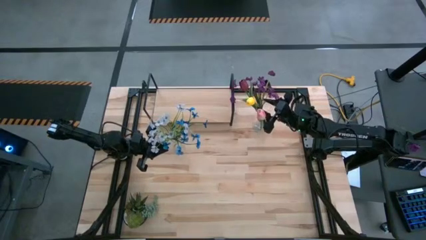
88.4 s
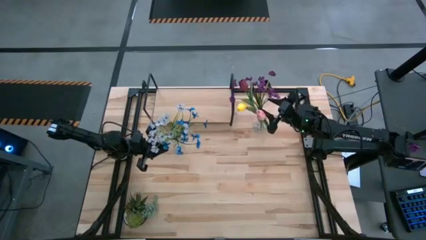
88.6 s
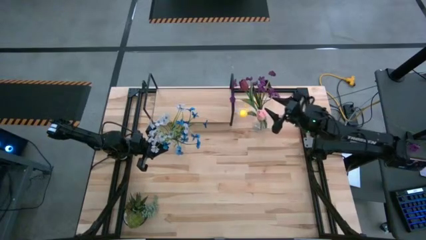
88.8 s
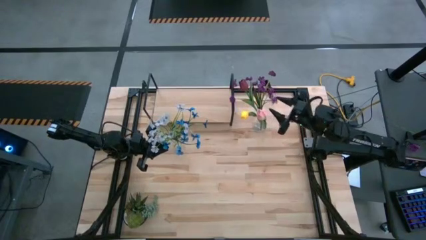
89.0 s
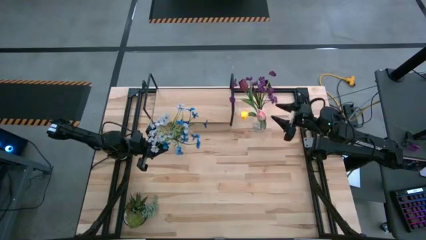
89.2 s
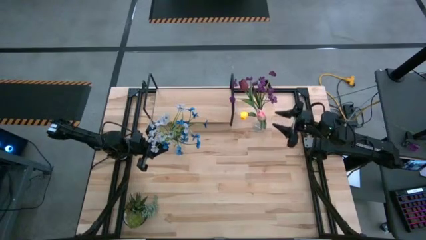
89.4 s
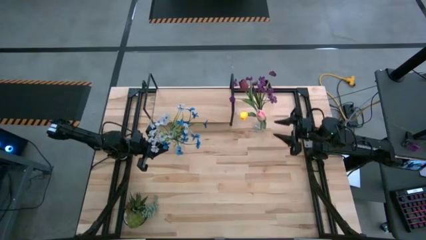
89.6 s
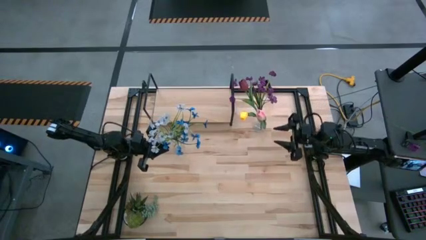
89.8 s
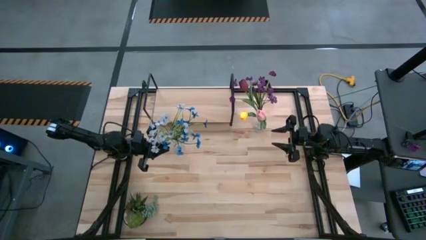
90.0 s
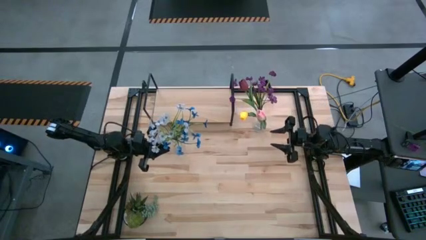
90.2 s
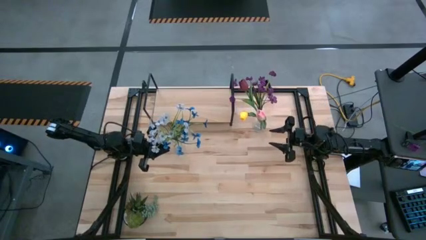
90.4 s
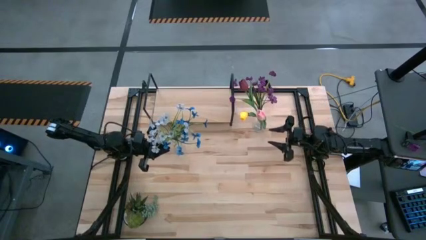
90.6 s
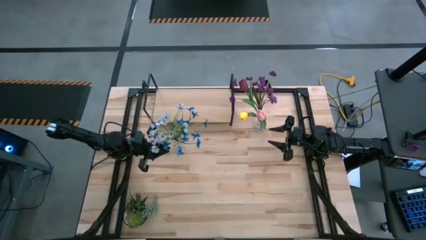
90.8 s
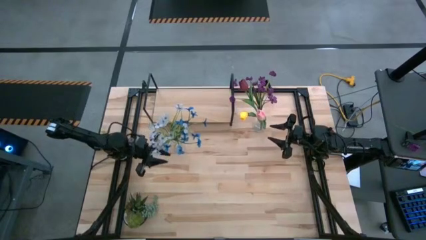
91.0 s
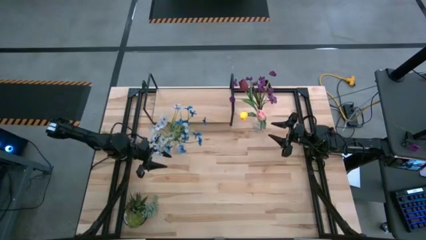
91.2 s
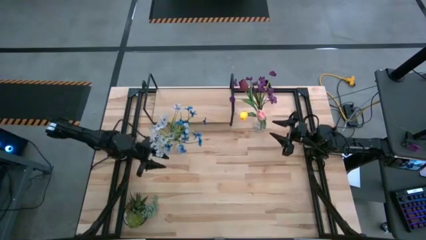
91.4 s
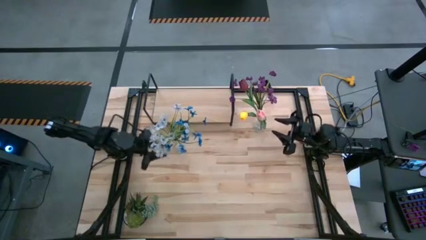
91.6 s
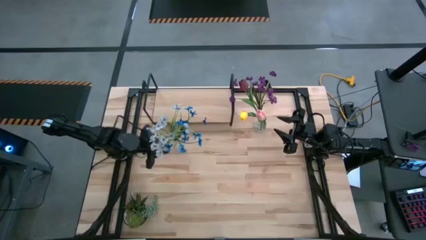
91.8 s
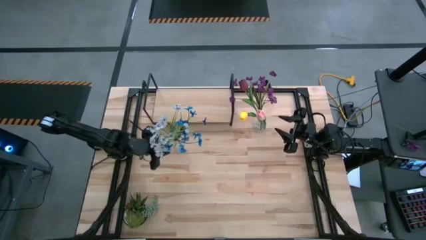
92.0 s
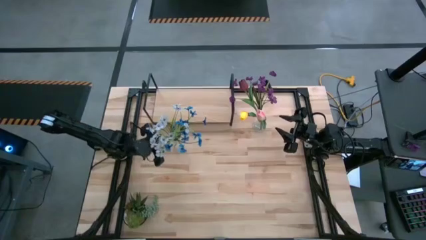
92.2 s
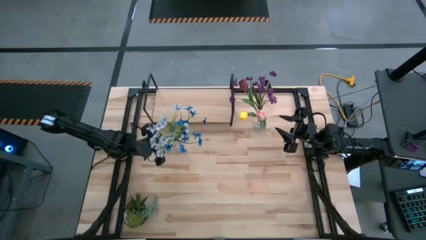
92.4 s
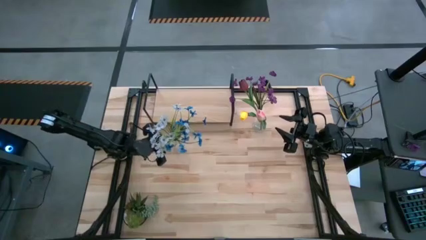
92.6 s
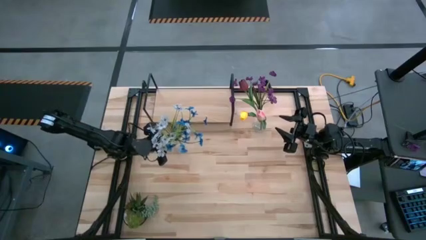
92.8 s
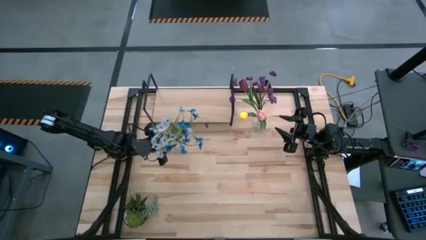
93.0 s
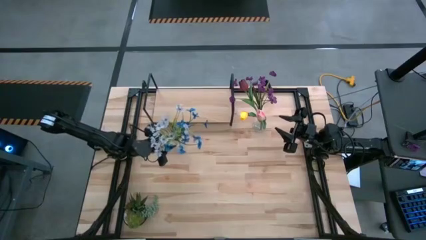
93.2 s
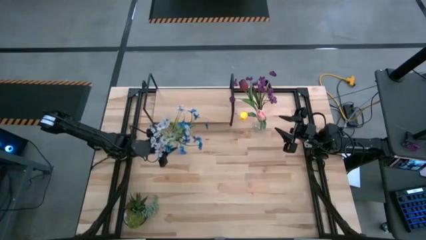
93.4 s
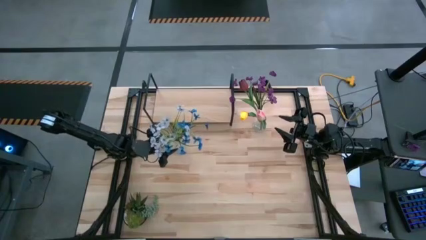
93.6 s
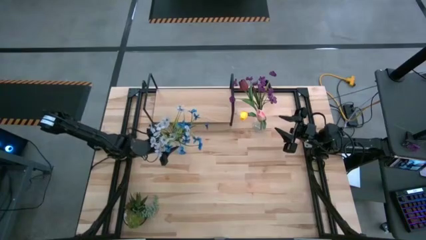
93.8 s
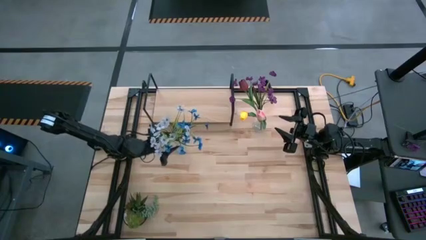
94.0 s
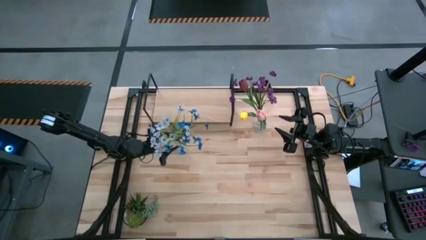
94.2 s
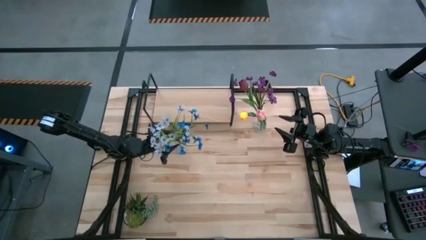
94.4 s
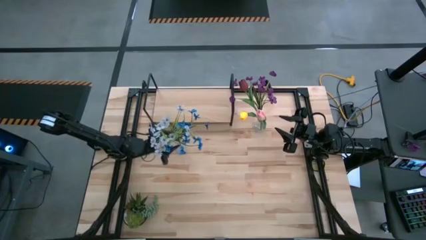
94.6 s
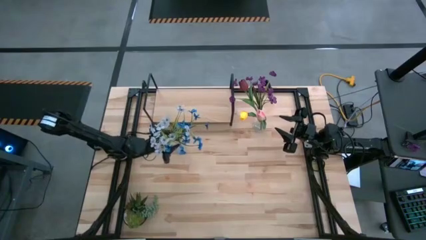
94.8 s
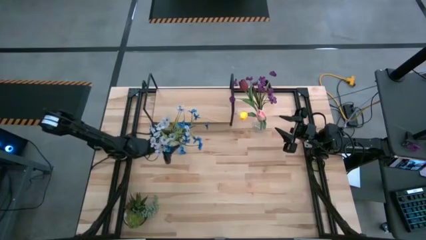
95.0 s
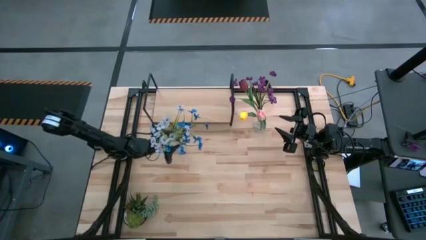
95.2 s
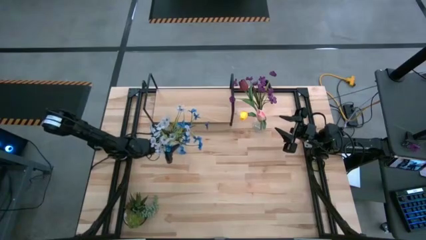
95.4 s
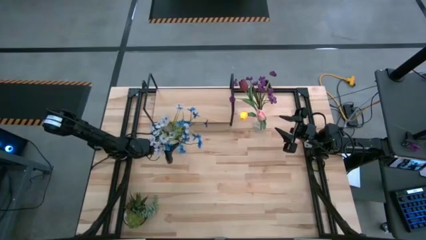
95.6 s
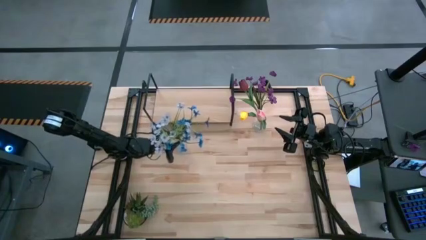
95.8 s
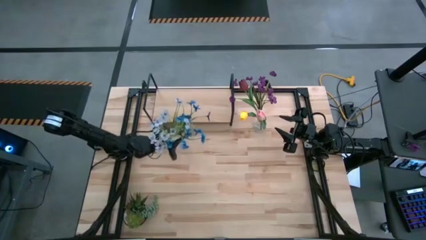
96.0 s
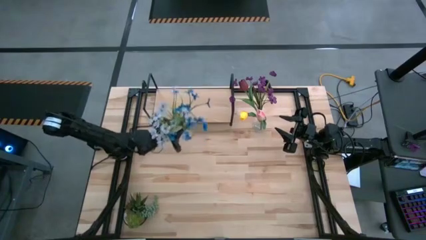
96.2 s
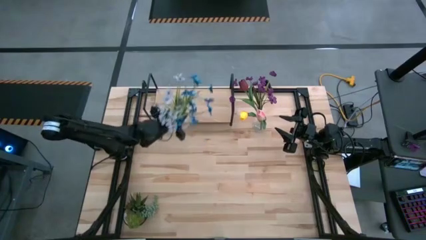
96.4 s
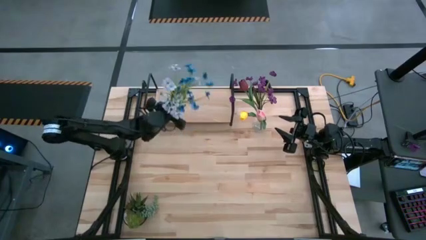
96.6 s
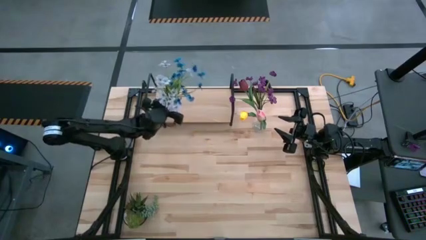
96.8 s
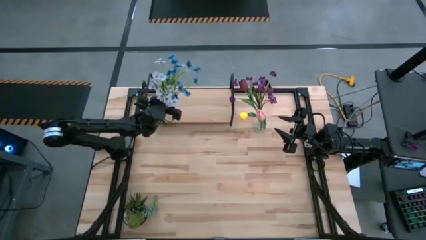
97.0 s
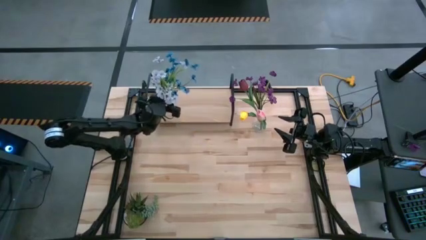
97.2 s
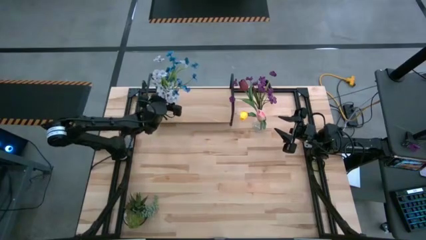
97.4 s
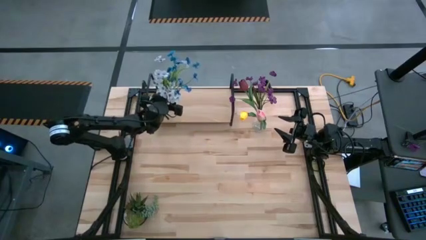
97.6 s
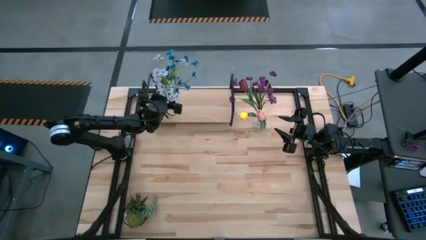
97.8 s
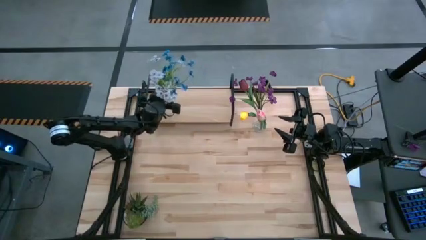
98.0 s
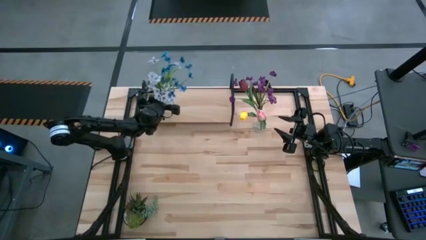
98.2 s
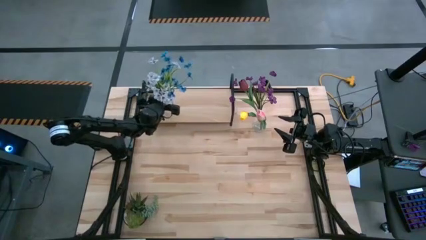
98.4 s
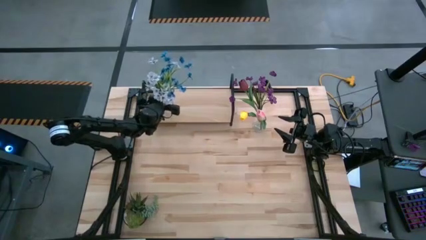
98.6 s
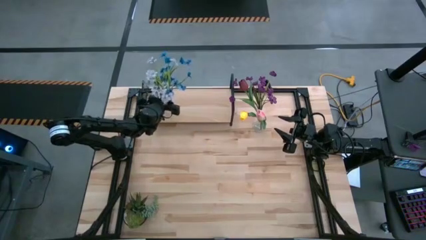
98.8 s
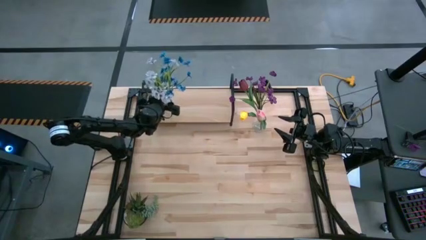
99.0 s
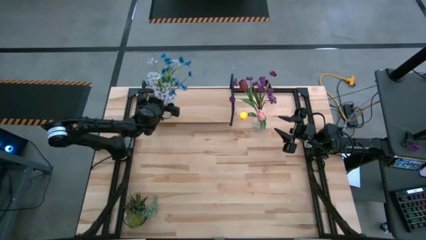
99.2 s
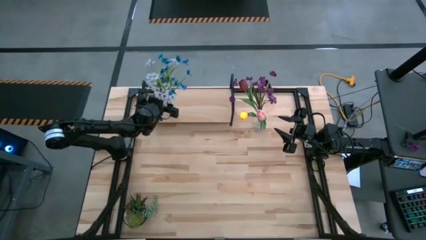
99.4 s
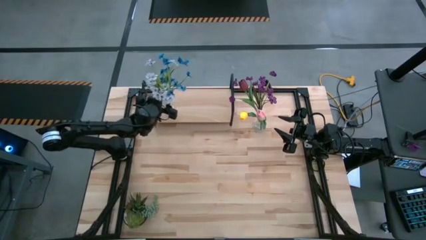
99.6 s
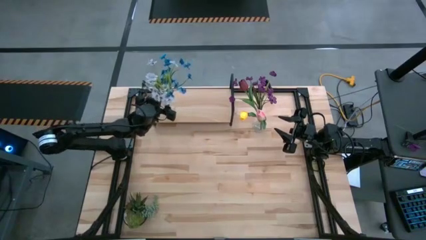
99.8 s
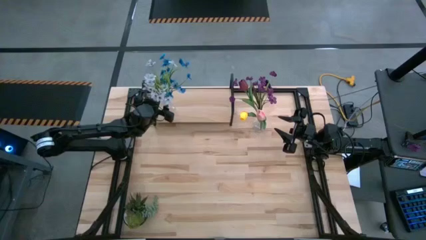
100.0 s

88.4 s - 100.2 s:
Task: Pick and place flowers into a vace then onto a shelf
Put the left transparent vase on the shelf

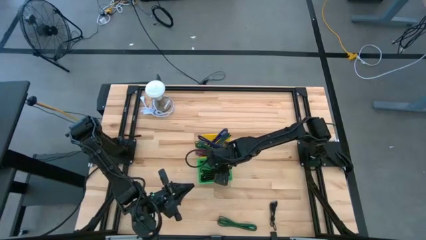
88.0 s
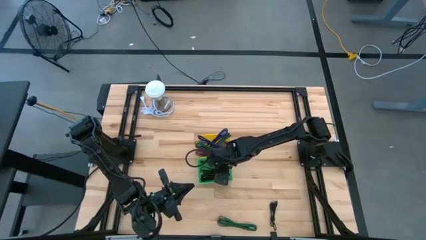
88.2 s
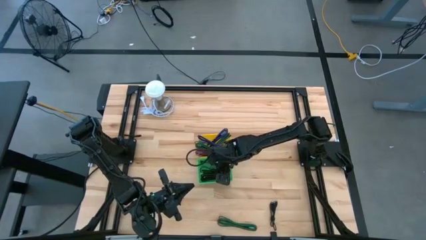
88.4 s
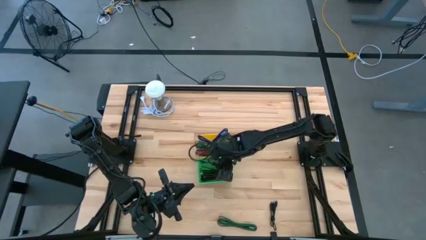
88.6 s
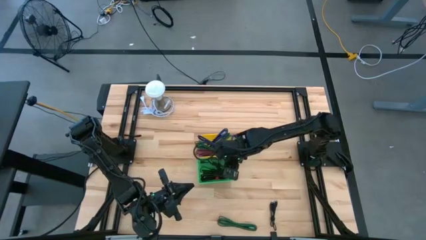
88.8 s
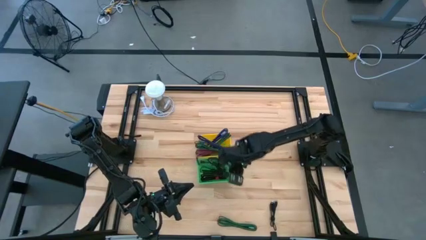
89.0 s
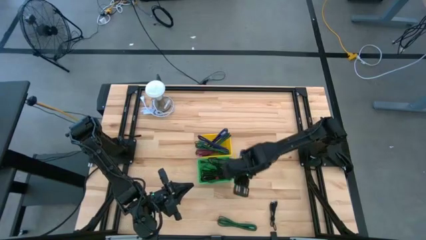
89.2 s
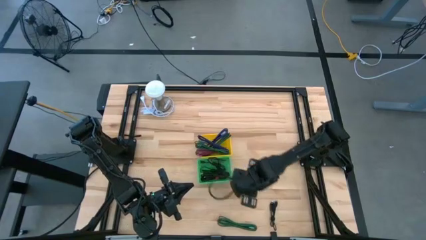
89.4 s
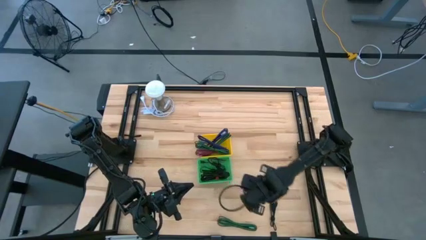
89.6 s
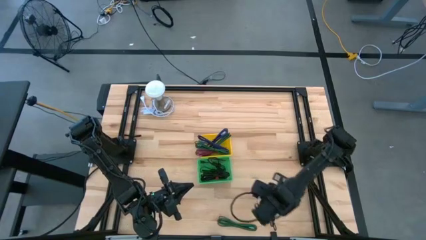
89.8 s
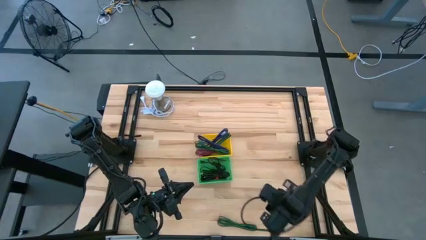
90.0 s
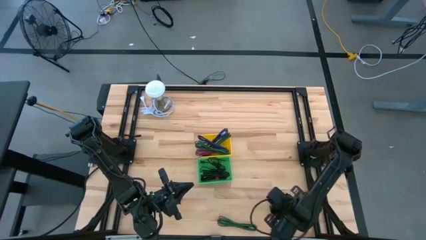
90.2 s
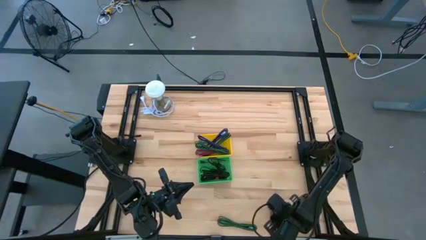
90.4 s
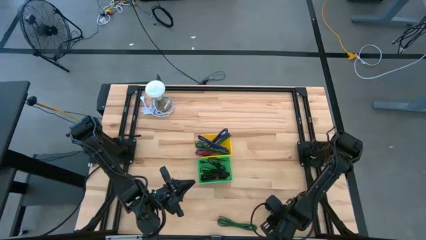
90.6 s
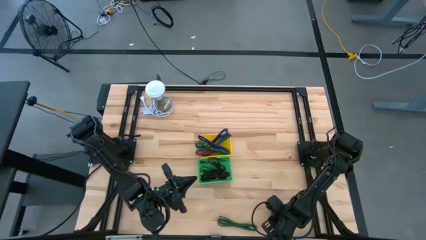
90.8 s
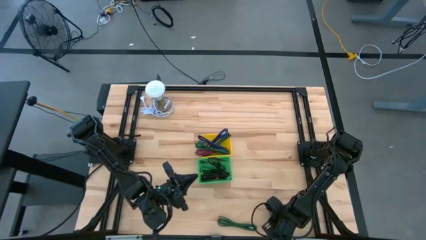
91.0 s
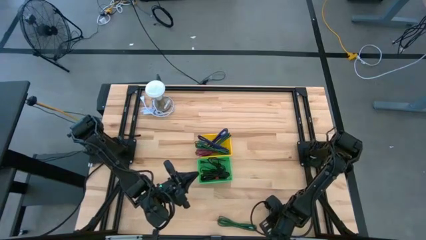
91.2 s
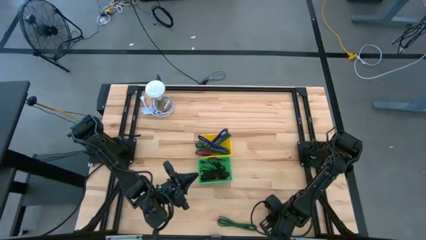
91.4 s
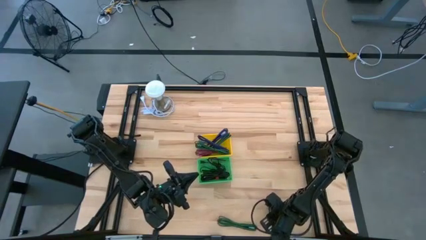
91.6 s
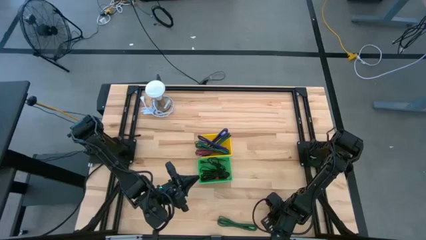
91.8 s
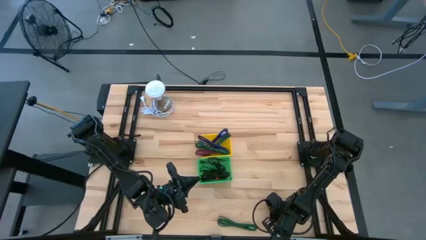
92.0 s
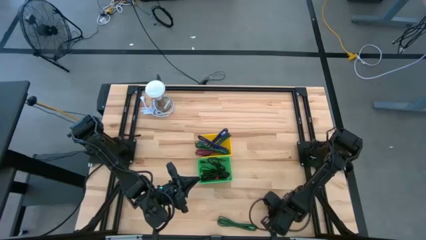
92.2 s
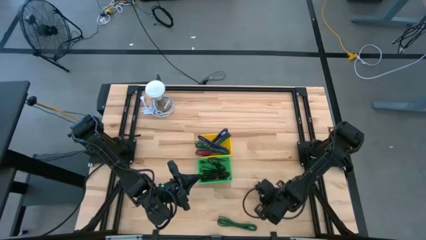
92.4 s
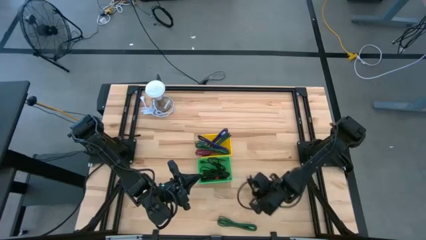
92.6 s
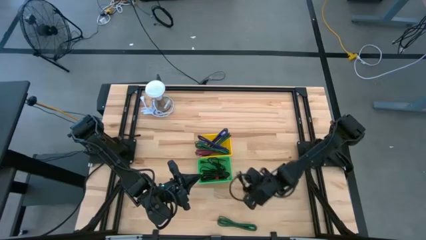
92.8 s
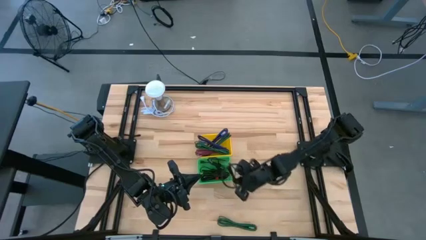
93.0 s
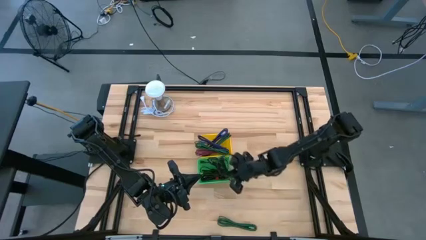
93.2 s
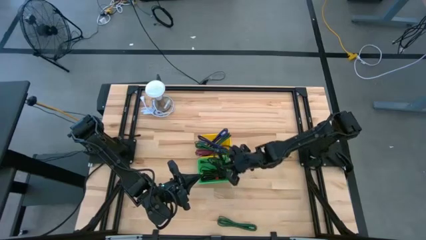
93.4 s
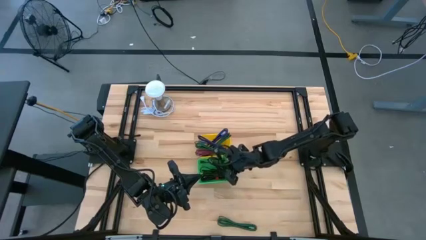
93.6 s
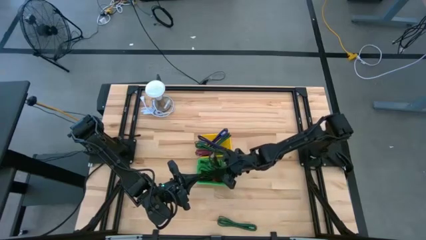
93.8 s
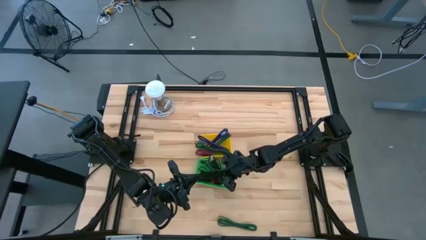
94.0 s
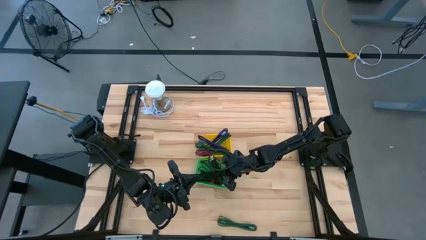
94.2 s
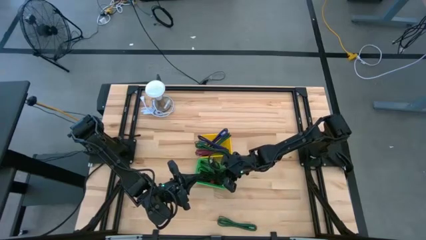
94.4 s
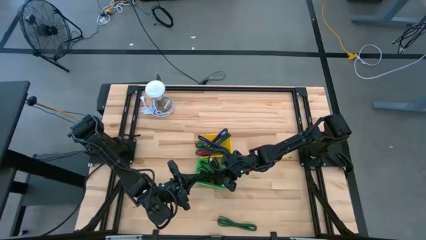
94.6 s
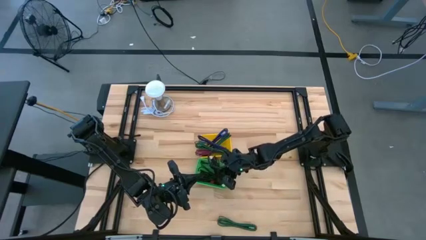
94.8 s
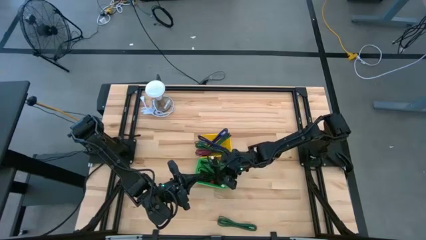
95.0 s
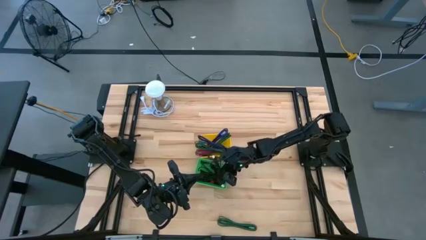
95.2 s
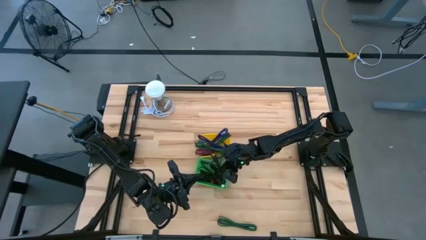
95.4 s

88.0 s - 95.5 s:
Task: Pick & Place USB Port
Put the black USB cable into the green bin
